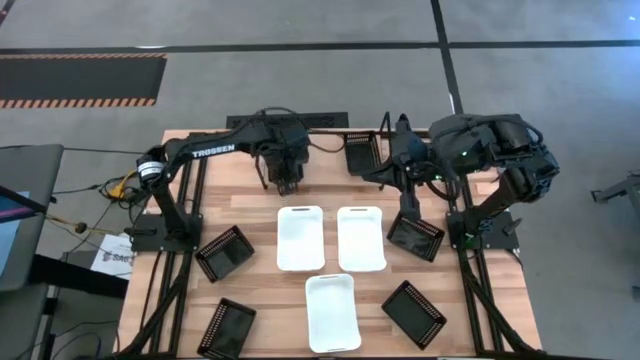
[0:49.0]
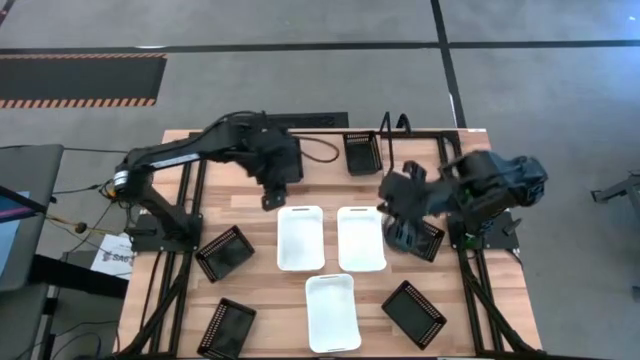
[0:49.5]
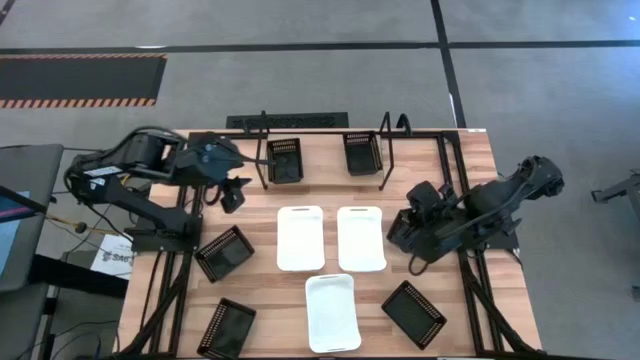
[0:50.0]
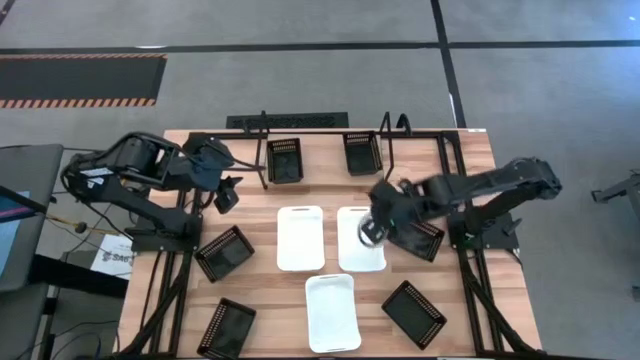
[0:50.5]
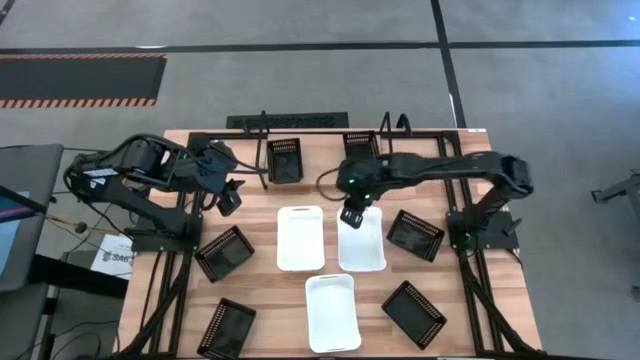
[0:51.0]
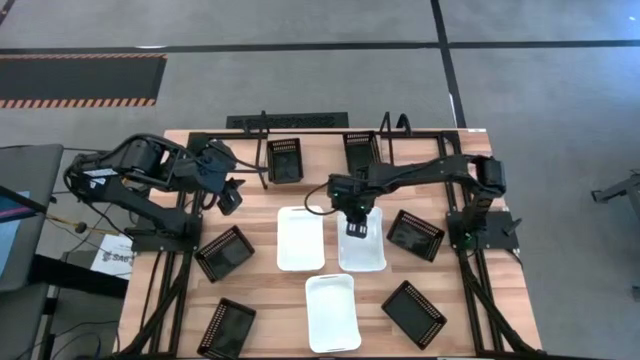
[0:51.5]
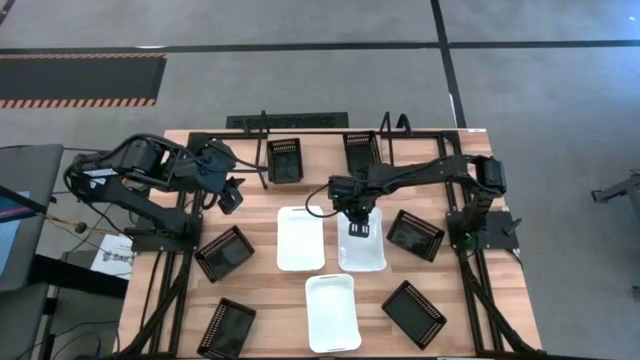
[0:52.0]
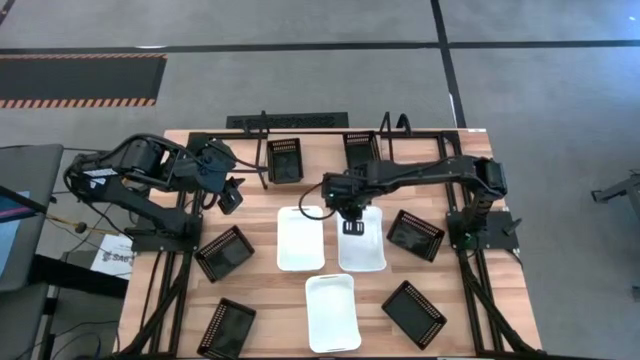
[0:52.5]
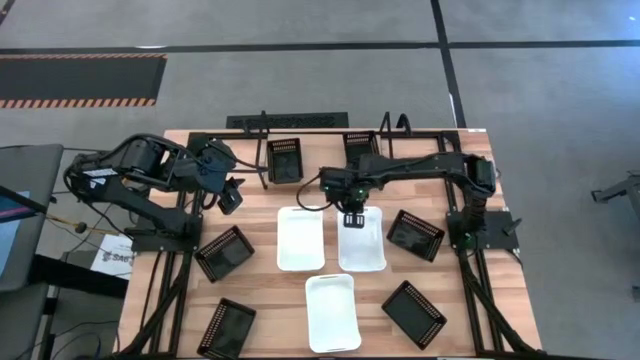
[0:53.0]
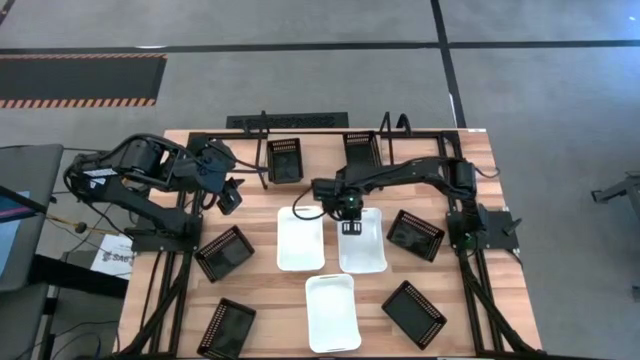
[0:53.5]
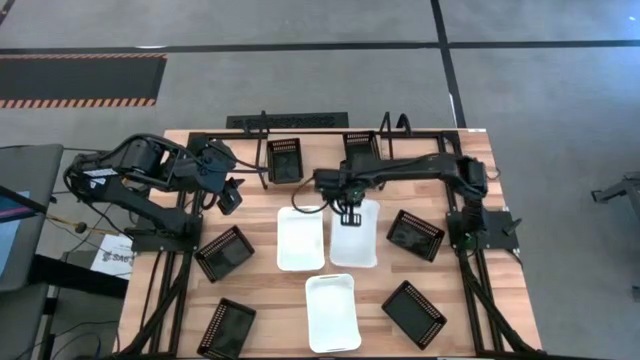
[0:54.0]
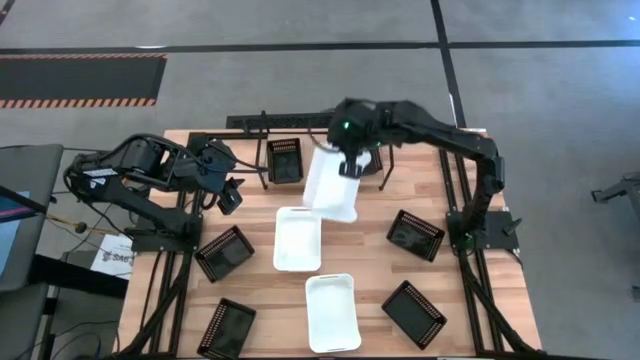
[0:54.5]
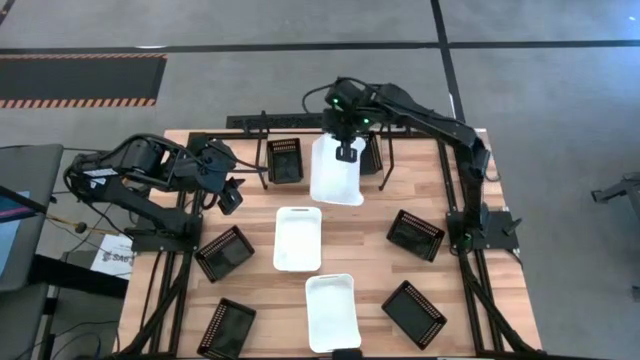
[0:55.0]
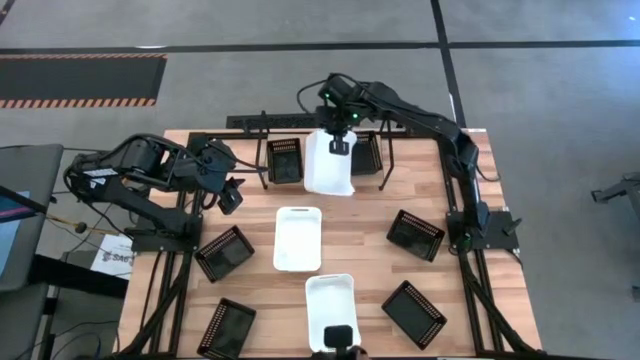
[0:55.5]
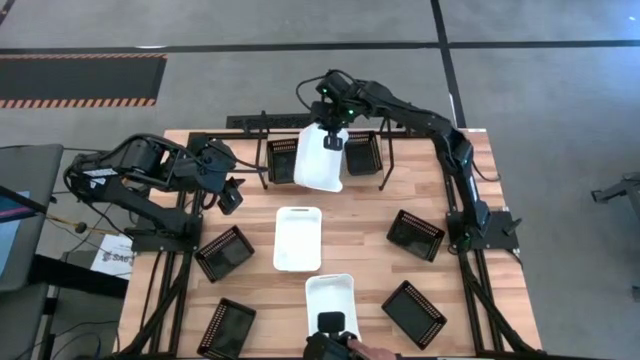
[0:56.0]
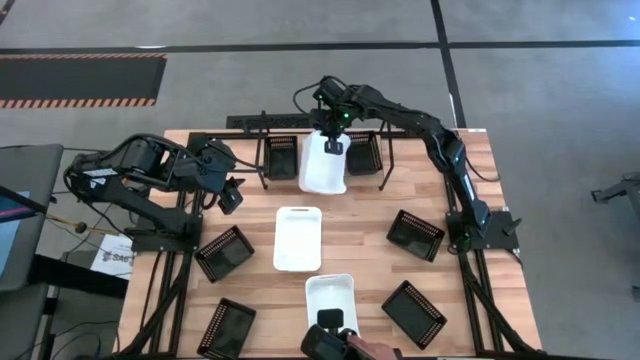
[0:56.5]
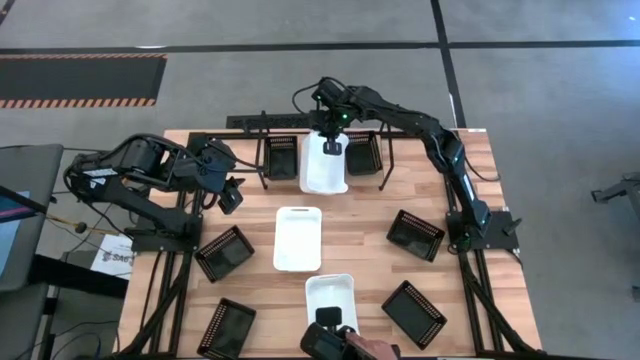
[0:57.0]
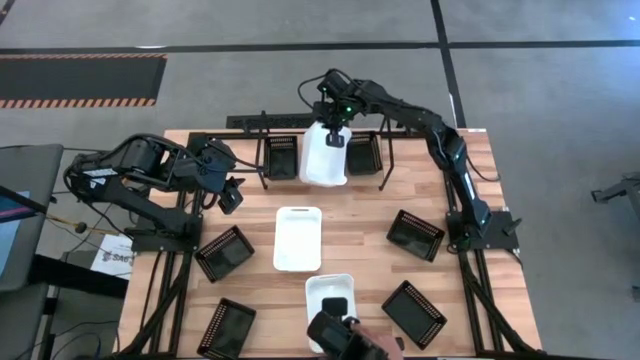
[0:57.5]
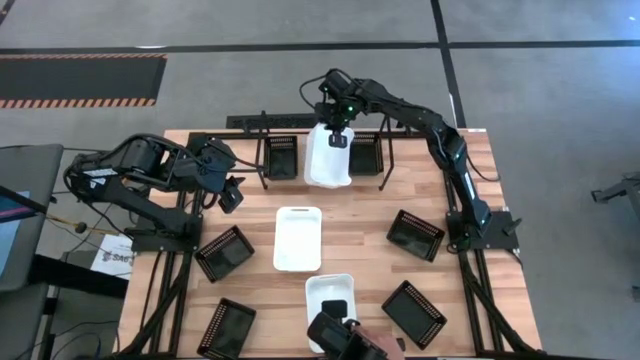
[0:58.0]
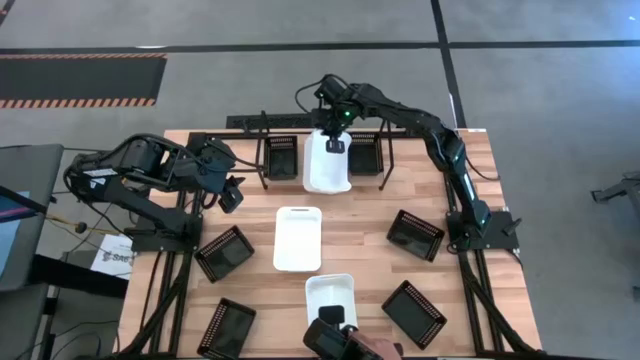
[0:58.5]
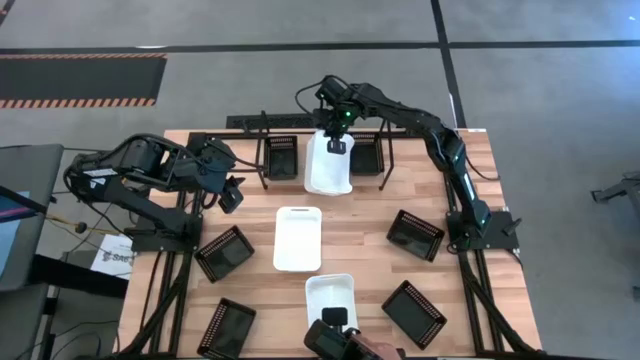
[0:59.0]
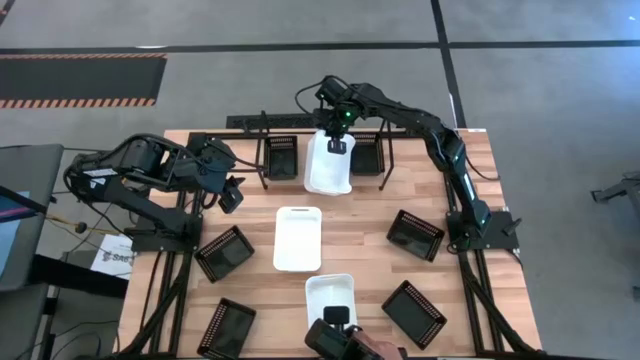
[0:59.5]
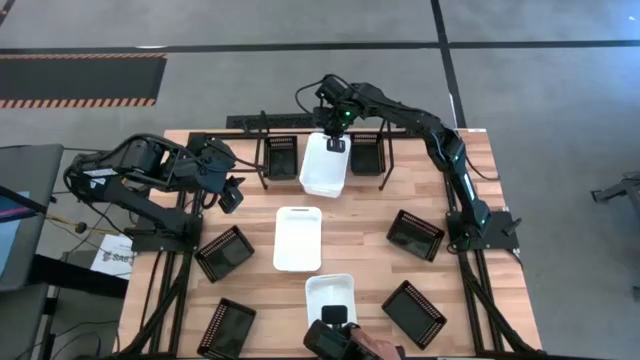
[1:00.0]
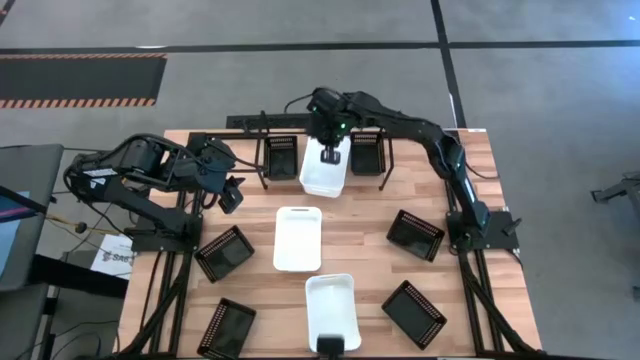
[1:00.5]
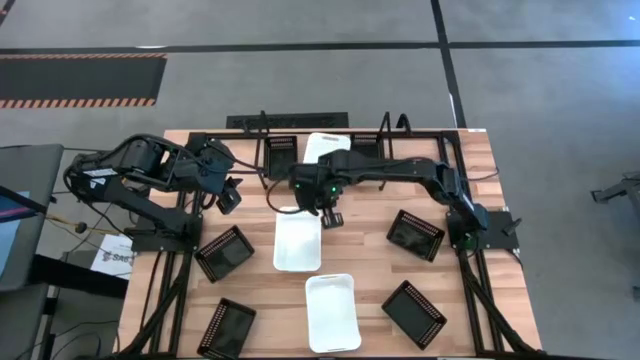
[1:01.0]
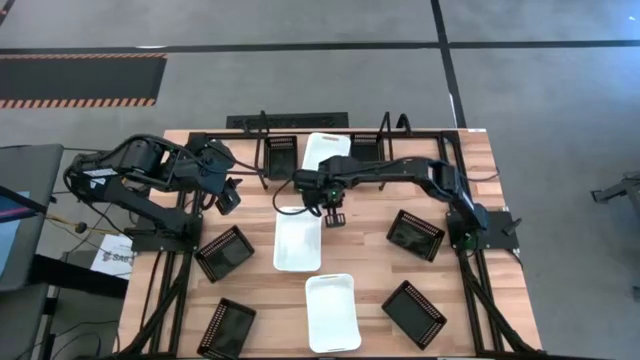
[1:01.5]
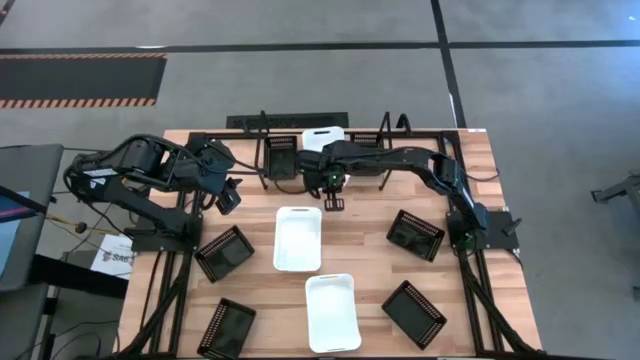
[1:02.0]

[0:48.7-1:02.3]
Task: Stack baskets on shelf by color
Put the right white bin on the shelf

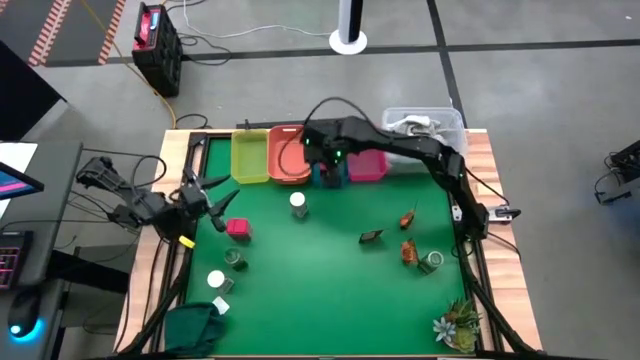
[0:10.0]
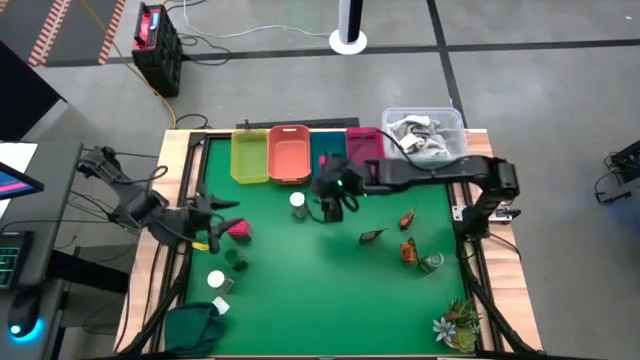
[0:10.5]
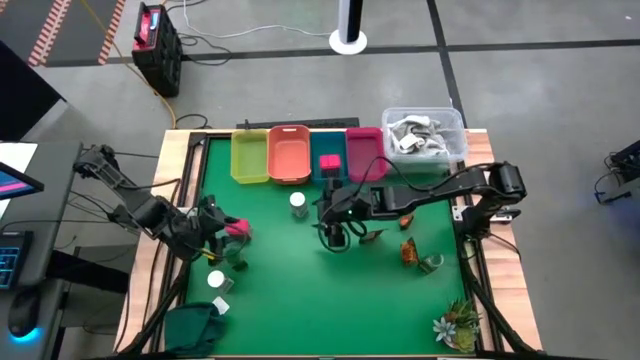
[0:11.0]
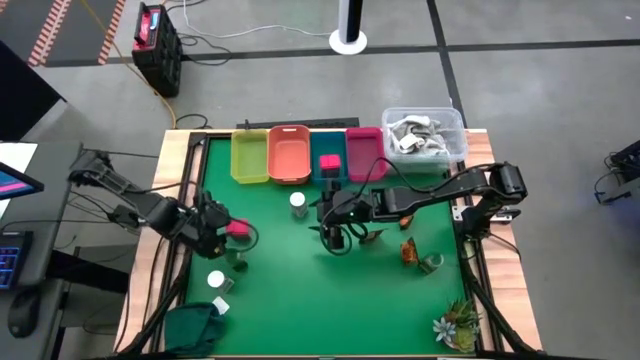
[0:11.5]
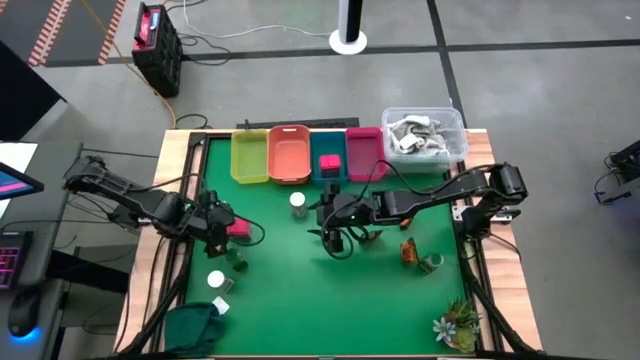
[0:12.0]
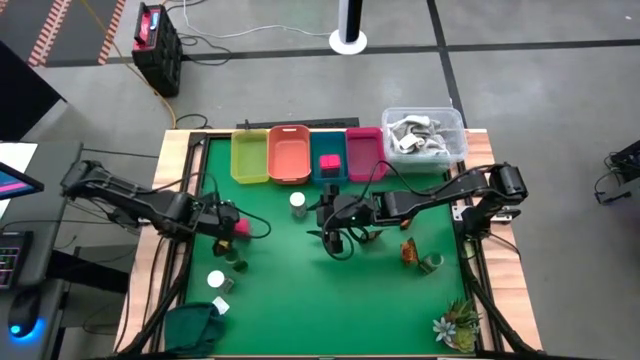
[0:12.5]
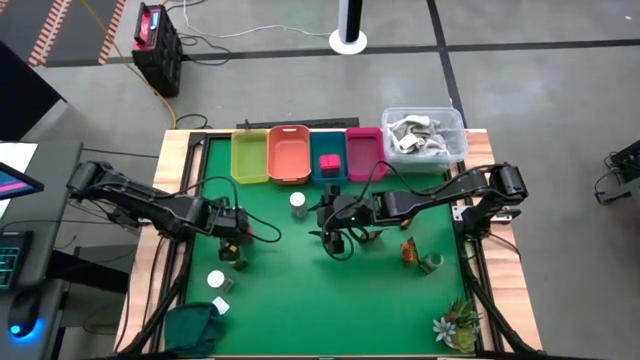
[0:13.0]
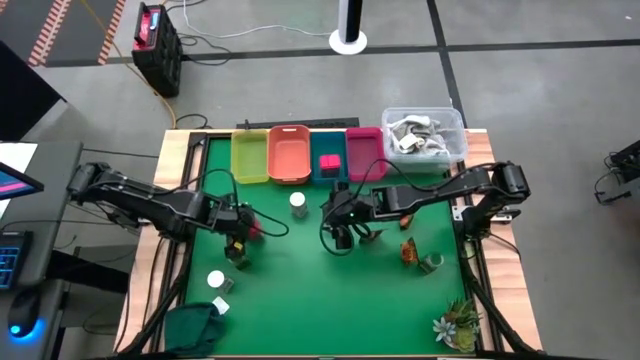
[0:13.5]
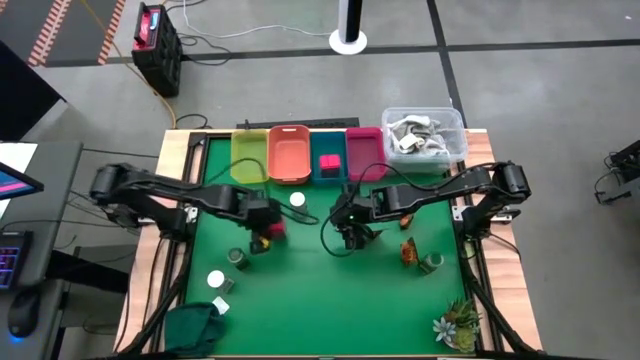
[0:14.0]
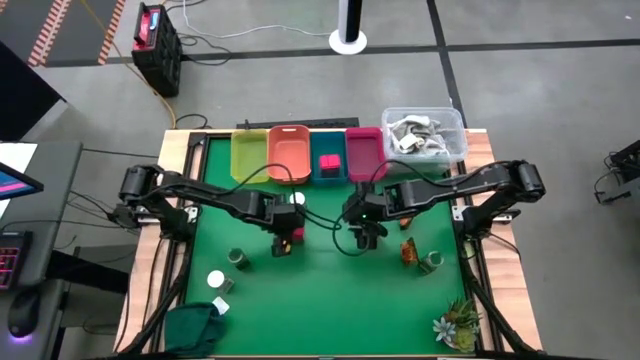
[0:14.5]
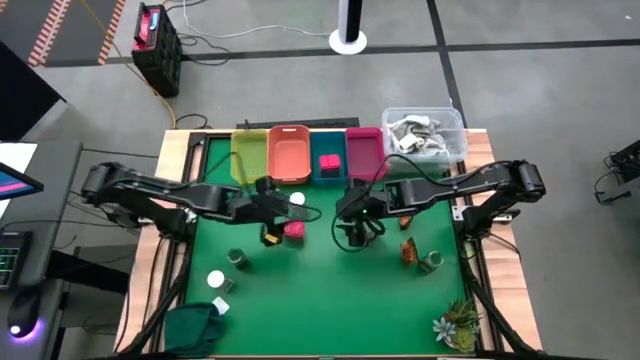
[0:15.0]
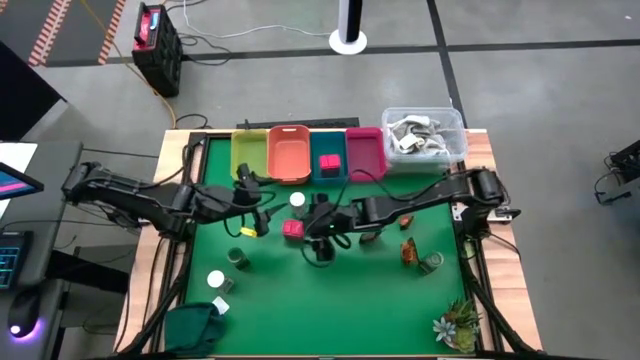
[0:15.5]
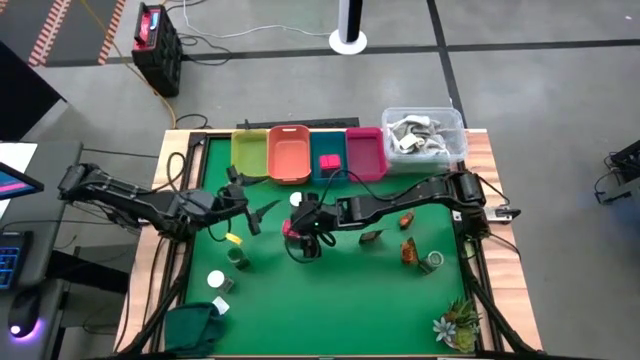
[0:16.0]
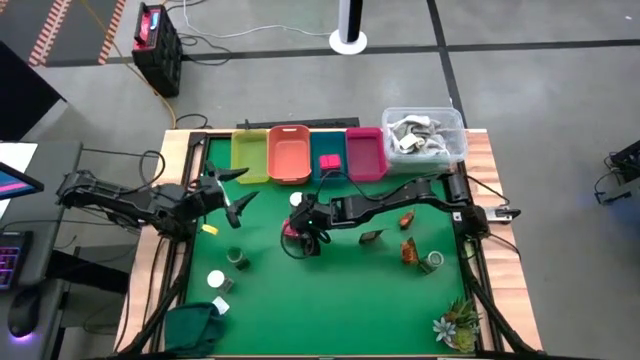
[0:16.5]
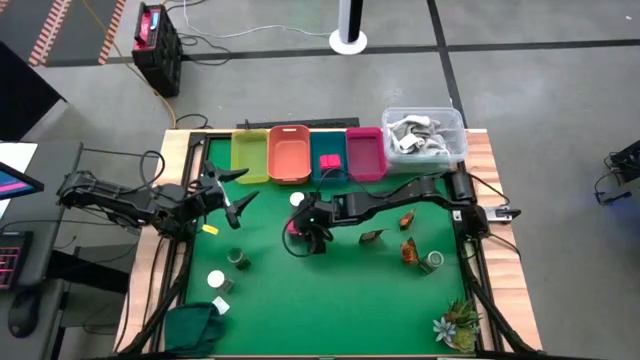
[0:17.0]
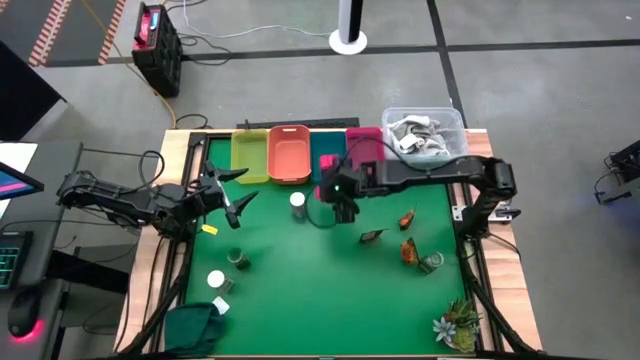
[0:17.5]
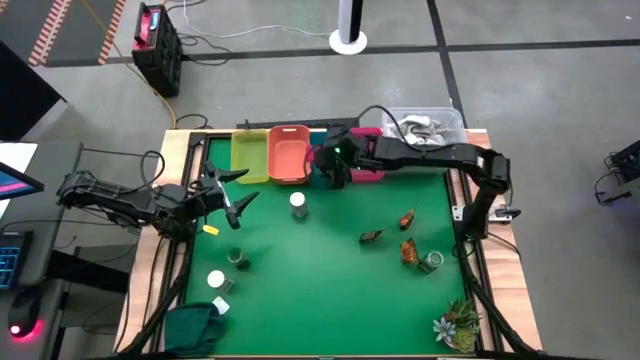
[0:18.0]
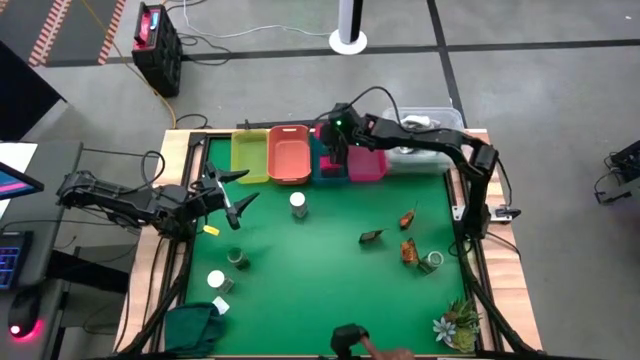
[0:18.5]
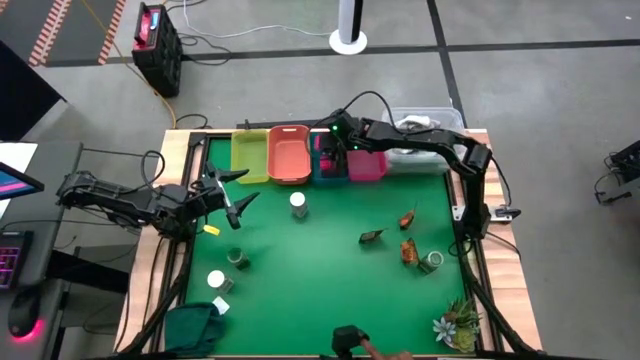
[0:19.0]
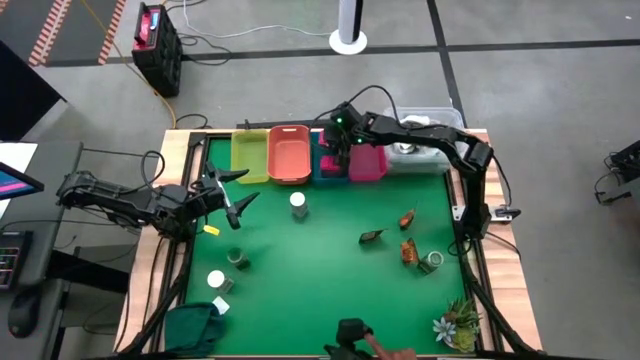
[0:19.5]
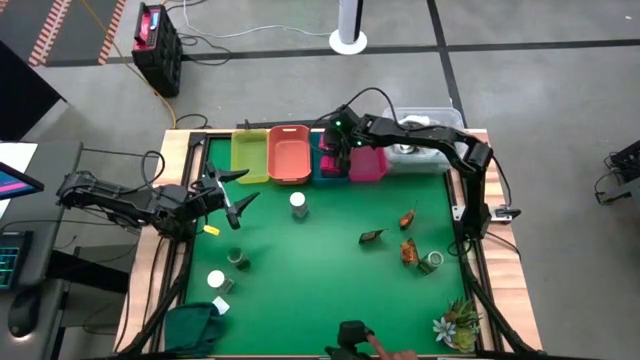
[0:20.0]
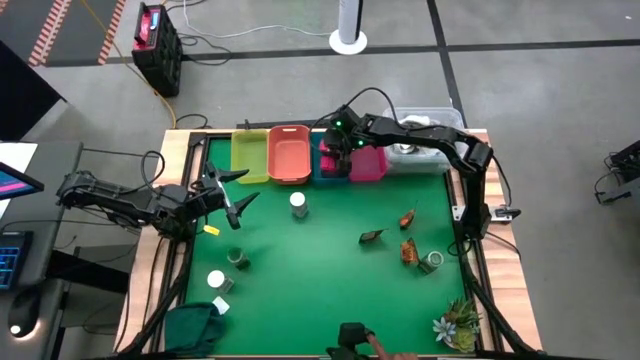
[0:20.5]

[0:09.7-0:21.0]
Task: Sort spices by type
Put the red seasoning can into the blue bin
